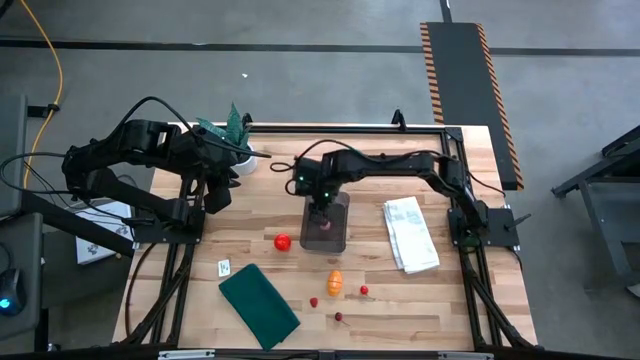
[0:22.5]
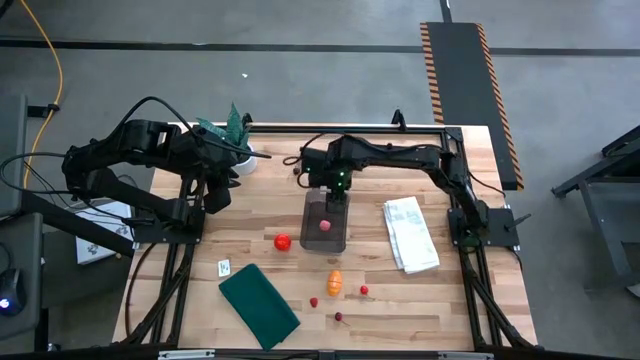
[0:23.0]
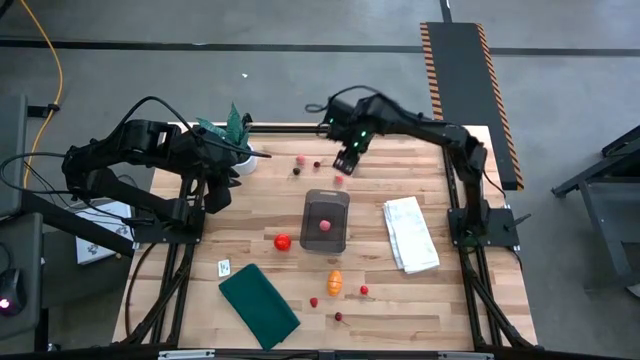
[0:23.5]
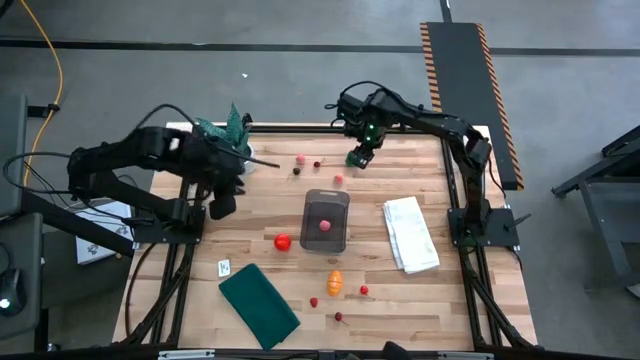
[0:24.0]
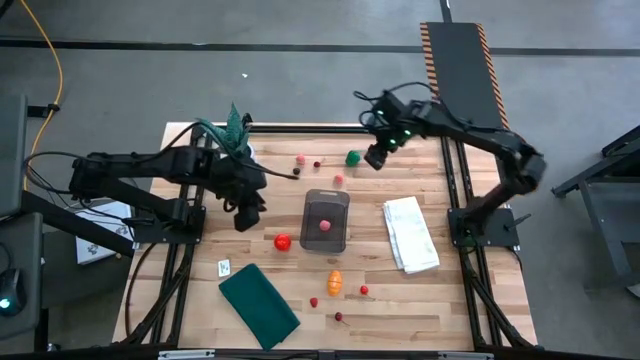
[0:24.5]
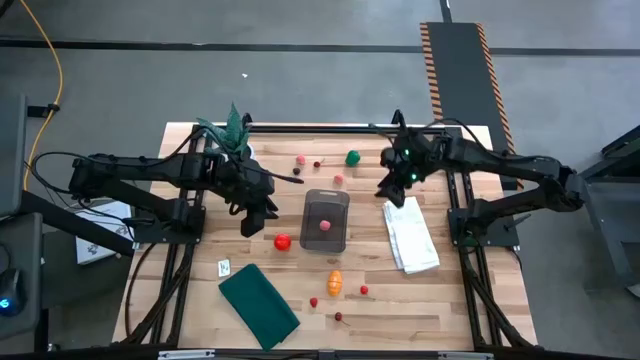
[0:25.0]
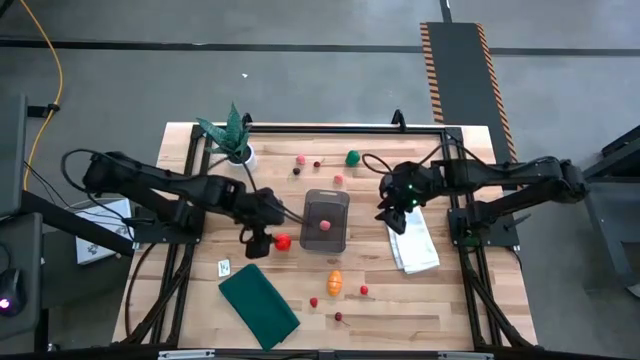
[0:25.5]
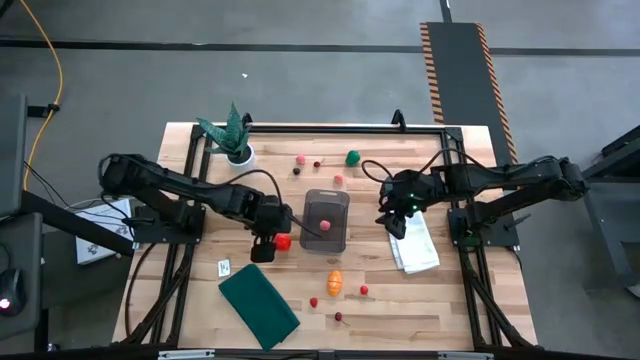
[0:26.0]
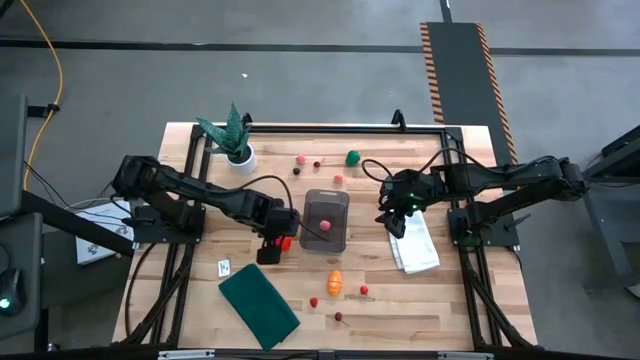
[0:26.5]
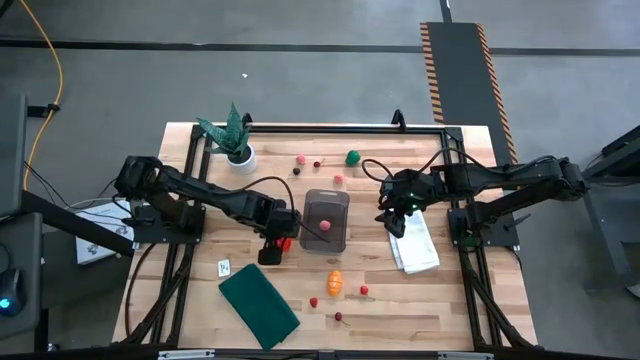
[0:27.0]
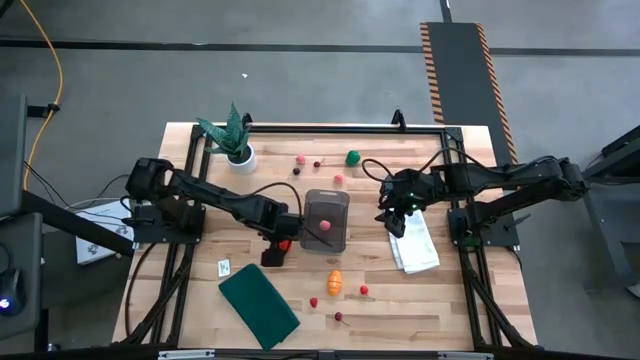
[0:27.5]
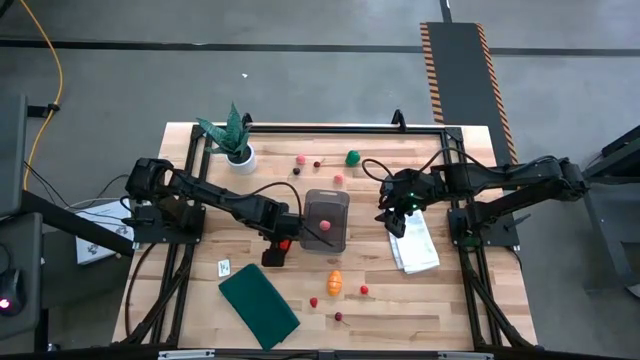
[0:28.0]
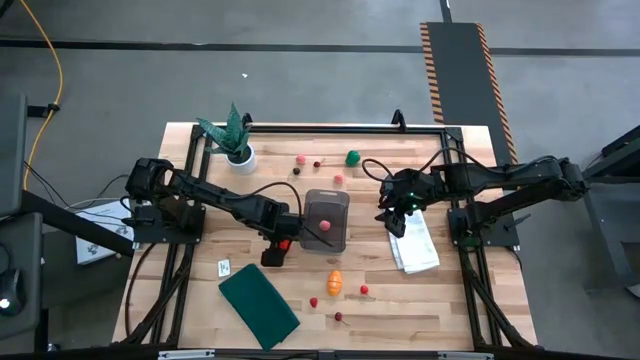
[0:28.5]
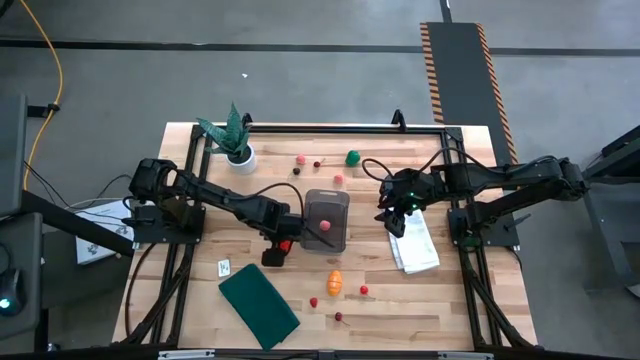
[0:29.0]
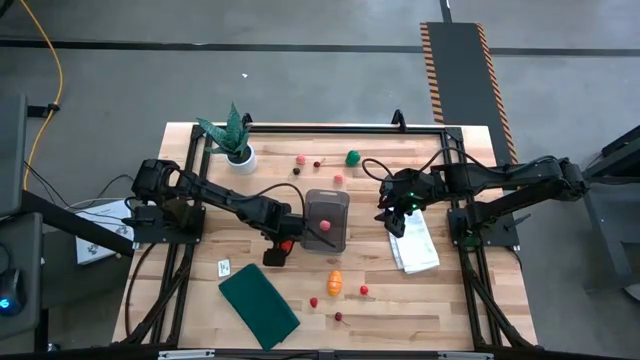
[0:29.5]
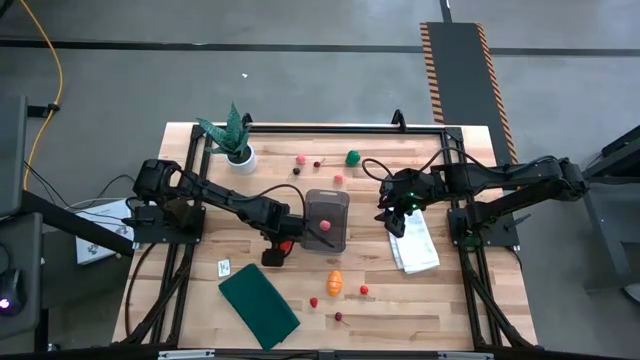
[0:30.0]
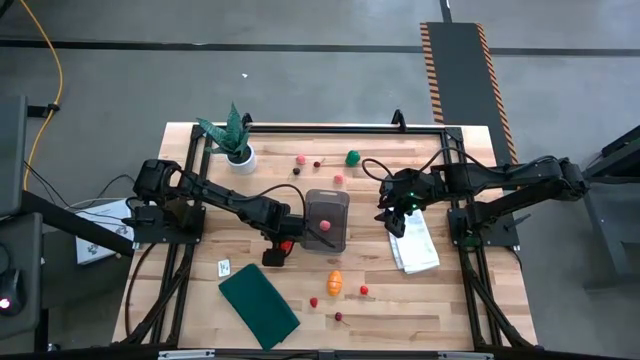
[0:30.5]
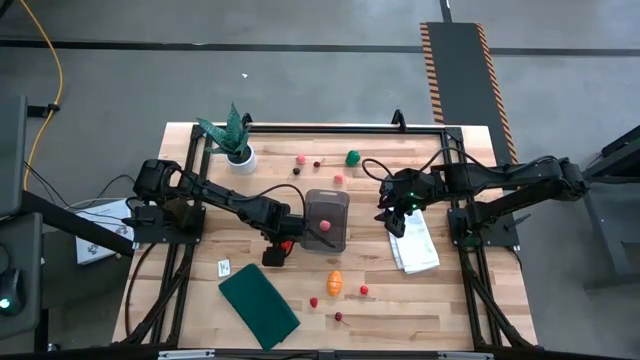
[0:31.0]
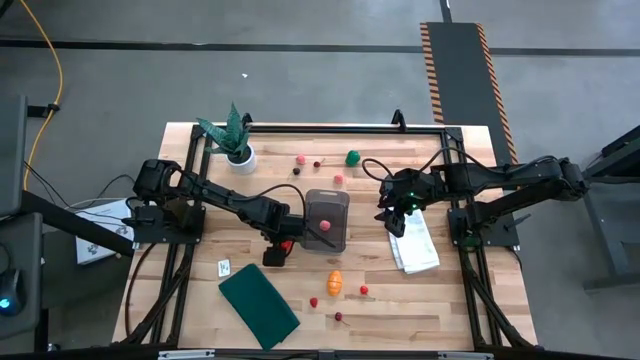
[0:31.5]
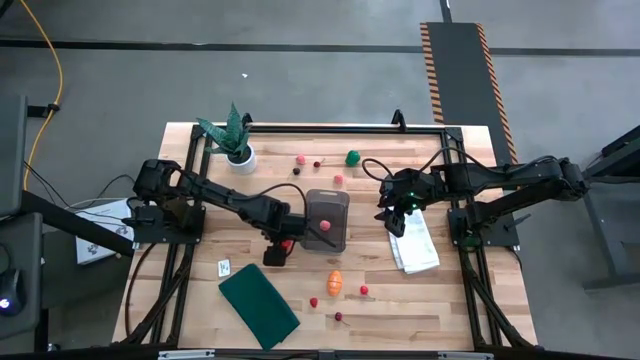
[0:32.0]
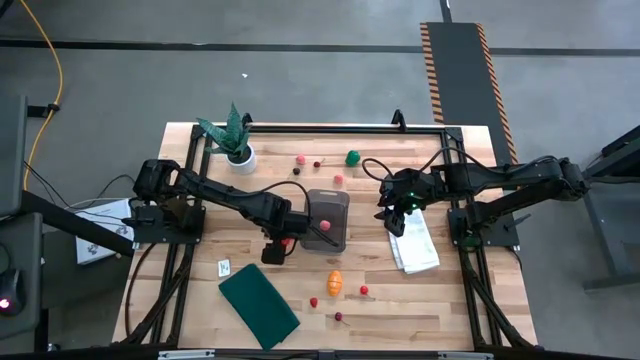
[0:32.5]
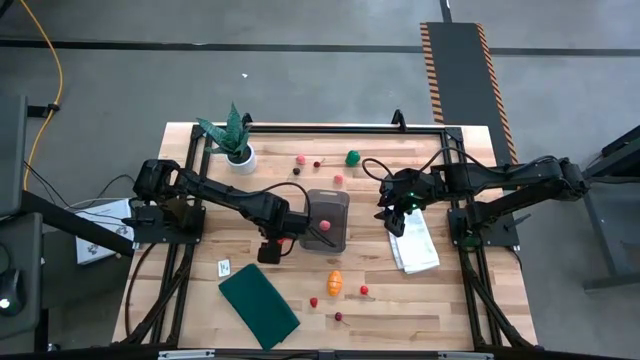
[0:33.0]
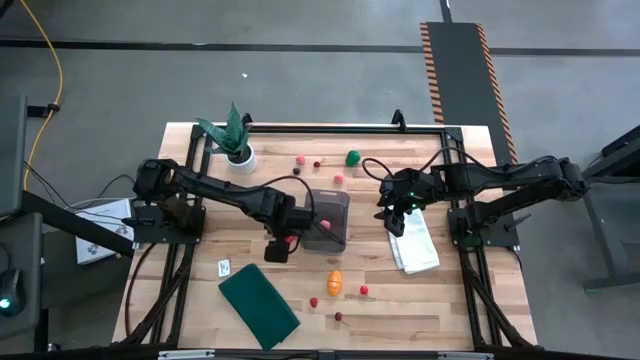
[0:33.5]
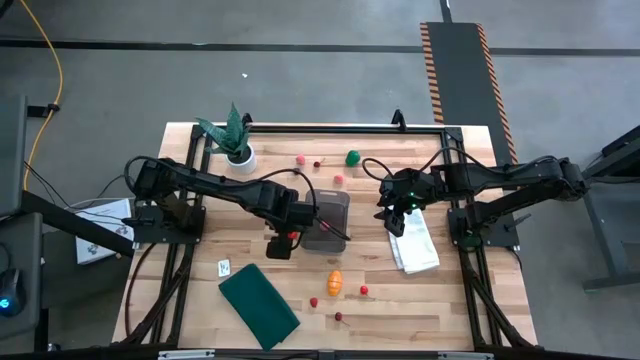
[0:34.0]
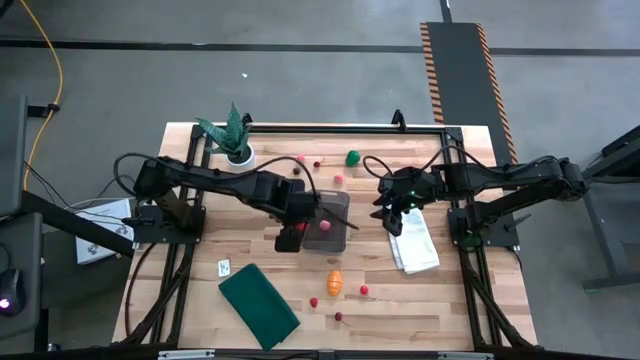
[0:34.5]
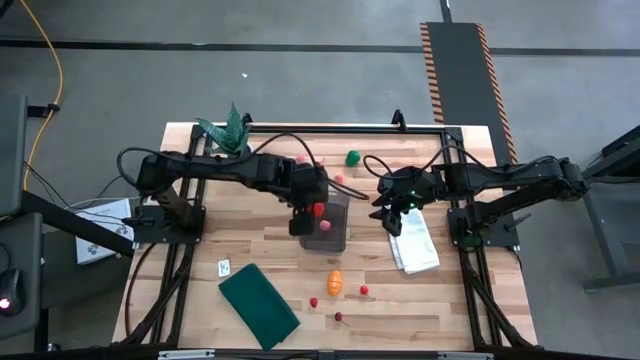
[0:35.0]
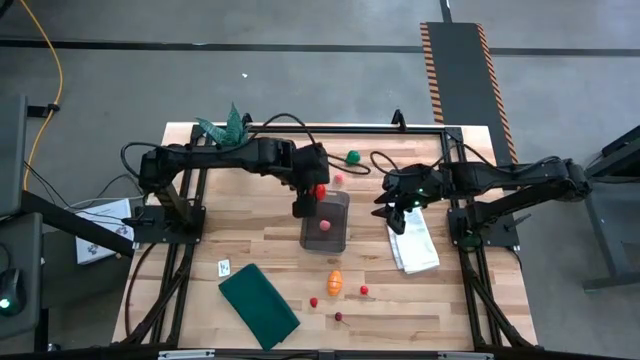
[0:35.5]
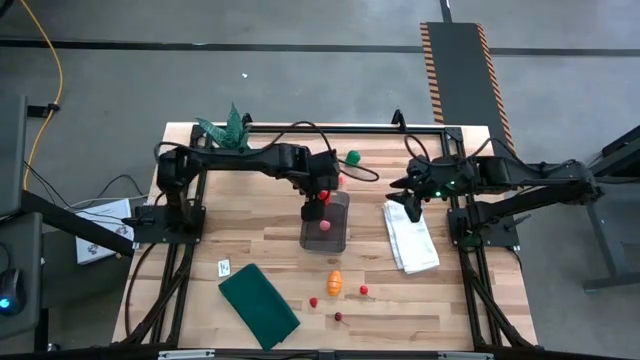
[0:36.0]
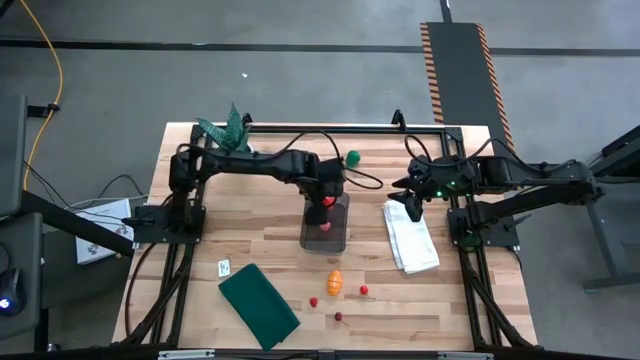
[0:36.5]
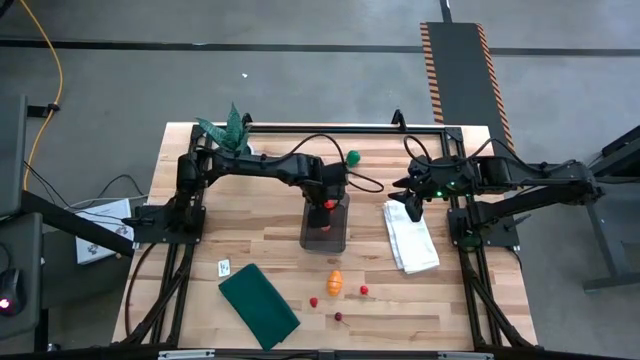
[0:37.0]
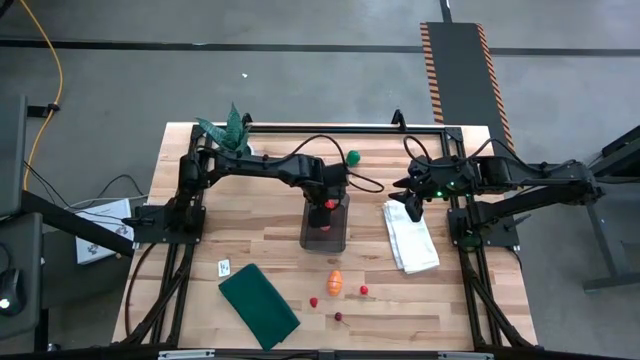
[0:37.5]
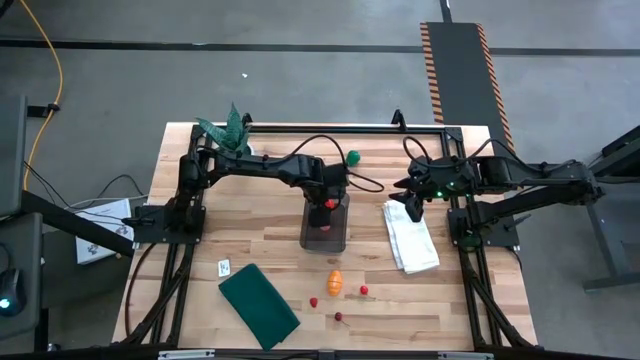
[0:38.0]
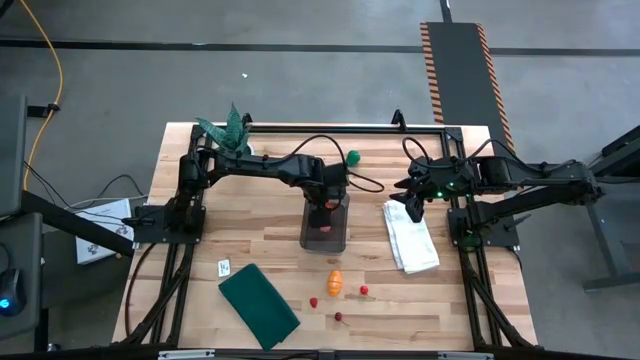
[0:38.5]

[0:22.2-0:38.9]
Task: Pick and placing Produce into tupperware
Put the tomato into the transparent black bin

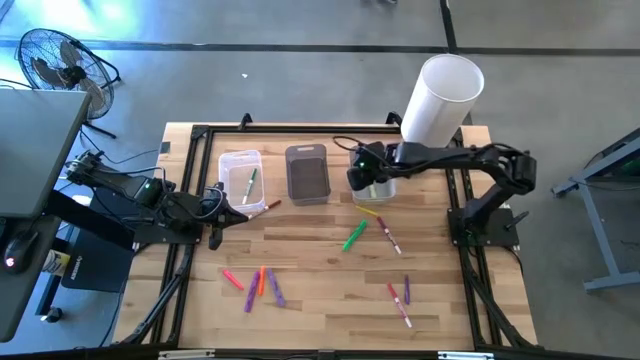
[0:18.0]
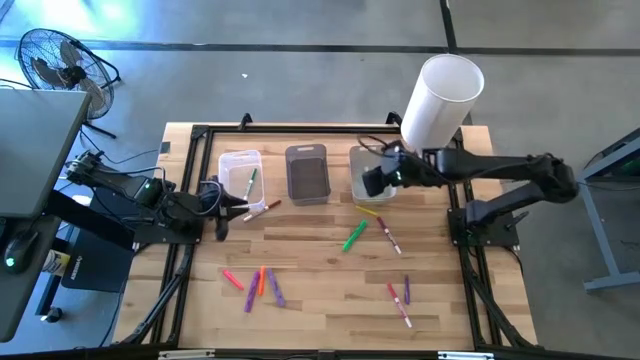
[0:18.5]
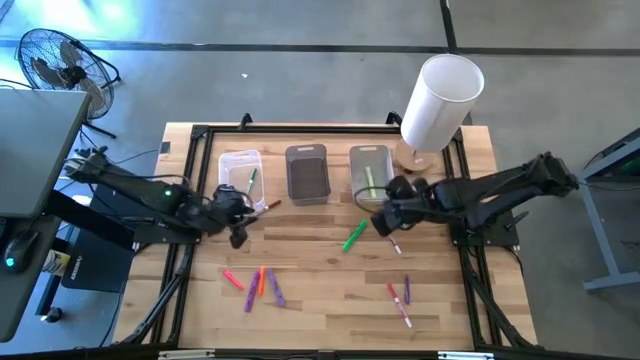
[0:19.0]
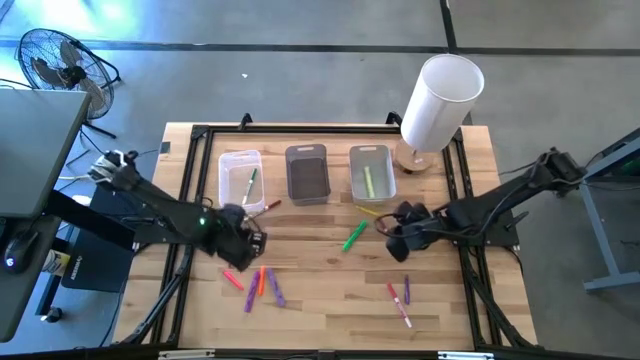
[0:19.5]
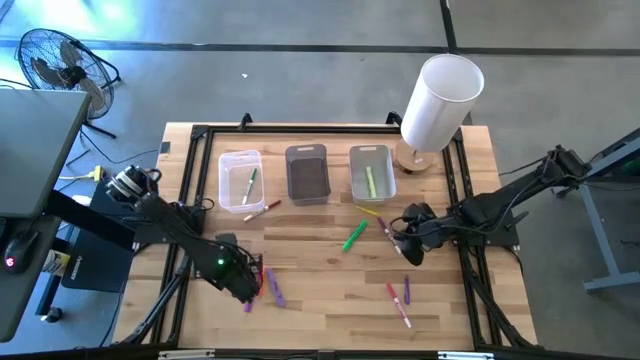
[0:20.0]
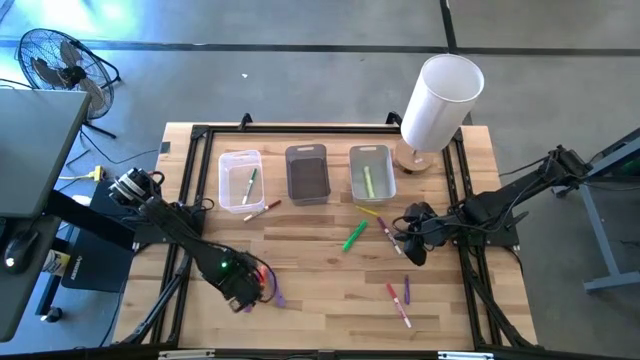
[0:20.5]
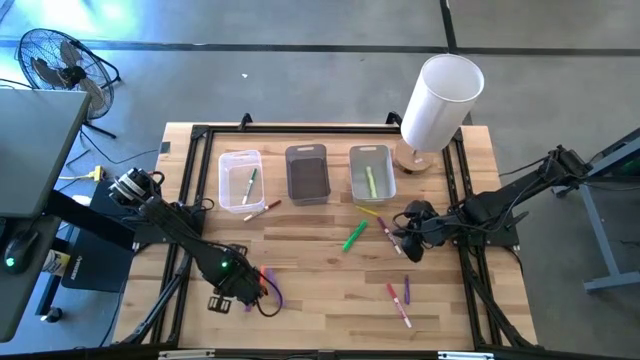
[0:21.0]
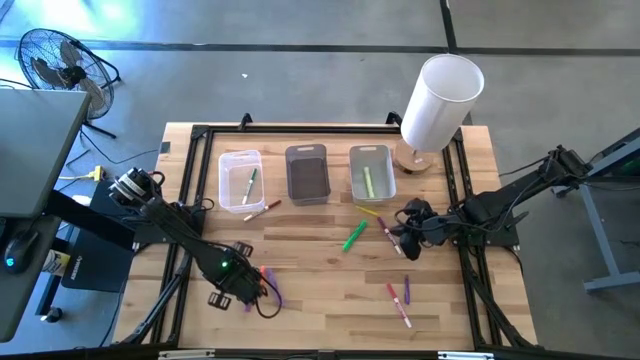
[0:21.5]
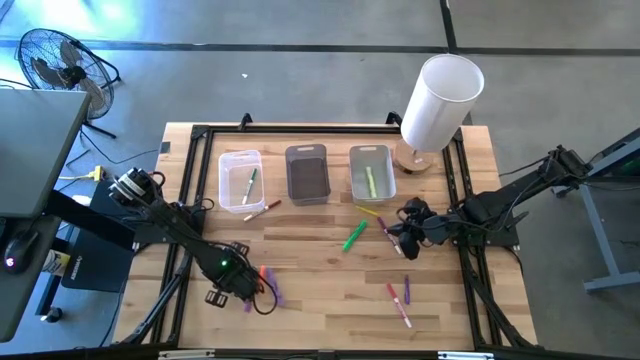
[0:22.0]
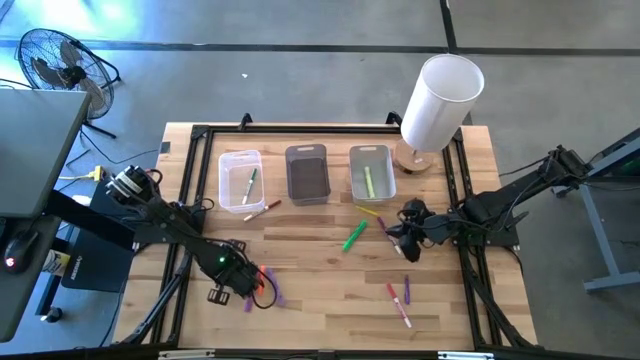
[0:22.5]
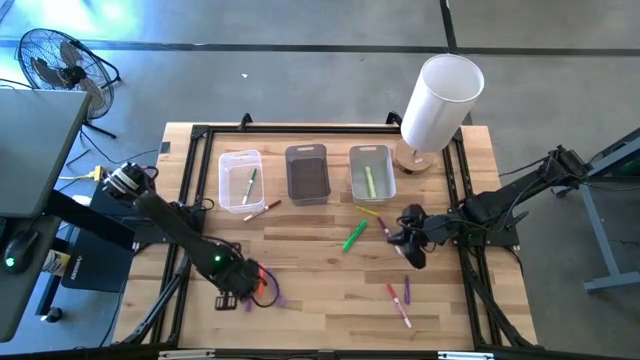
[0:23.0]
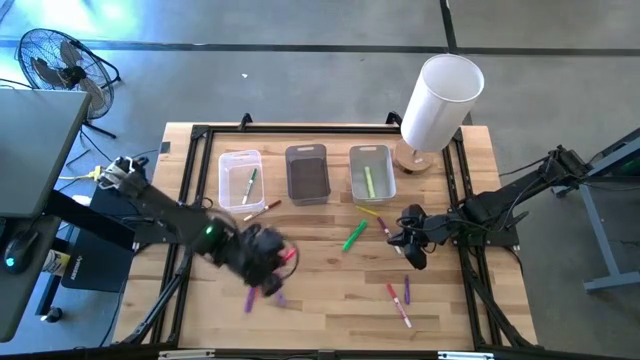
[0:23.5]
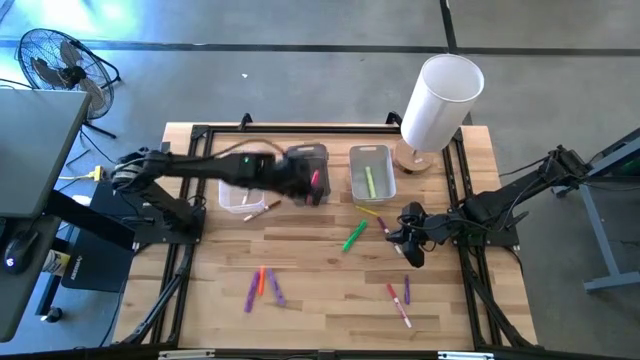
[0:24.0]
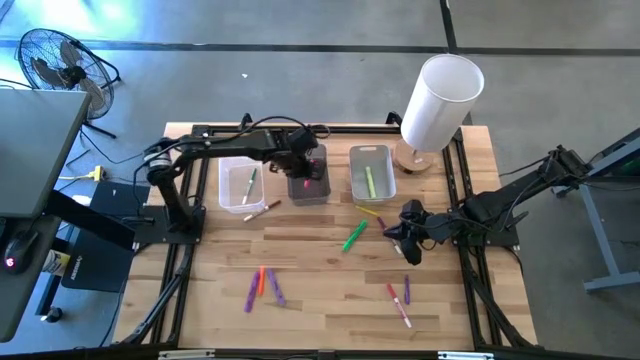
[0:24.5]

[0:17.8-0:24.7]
Task: Pick & Place Markers
Put the pink pen into the black bin
